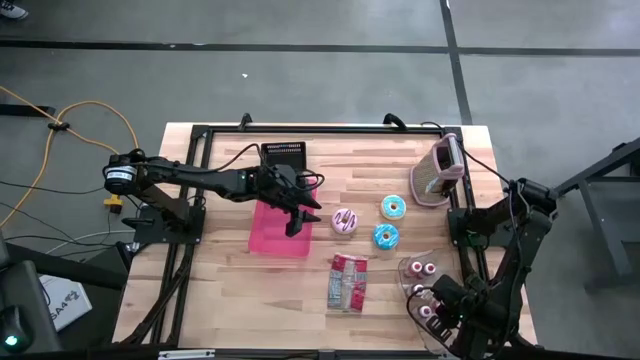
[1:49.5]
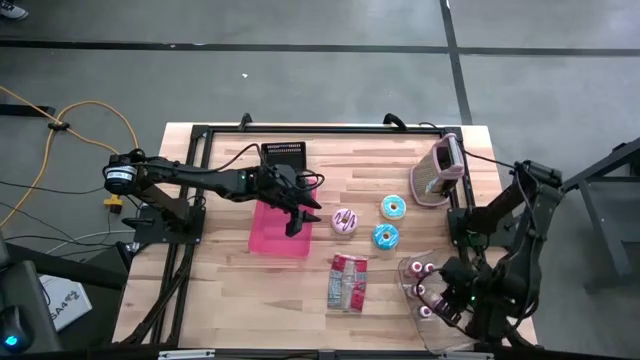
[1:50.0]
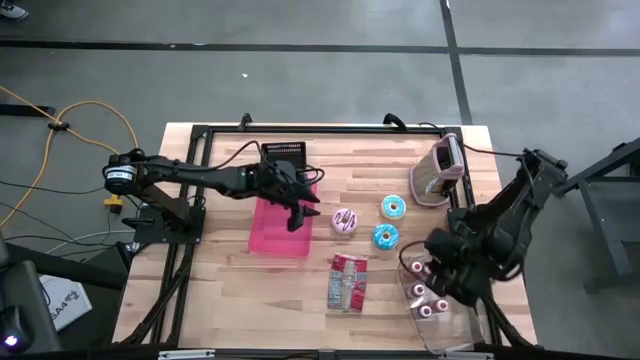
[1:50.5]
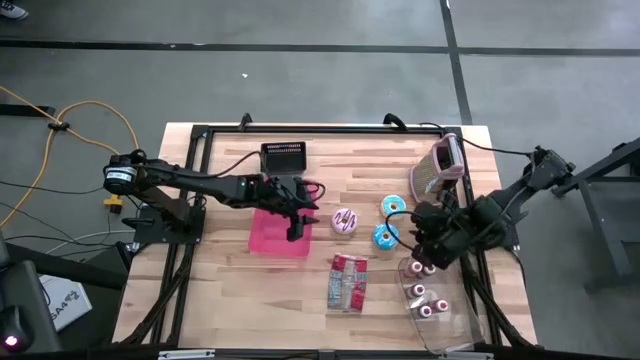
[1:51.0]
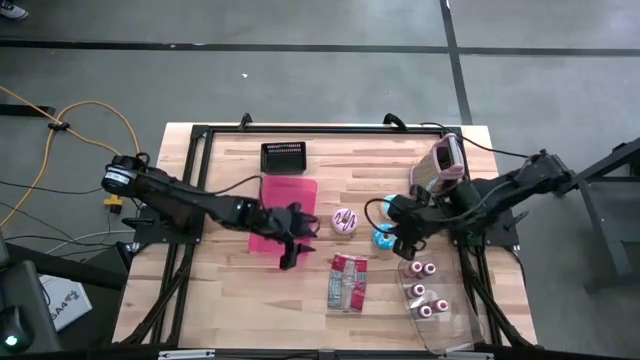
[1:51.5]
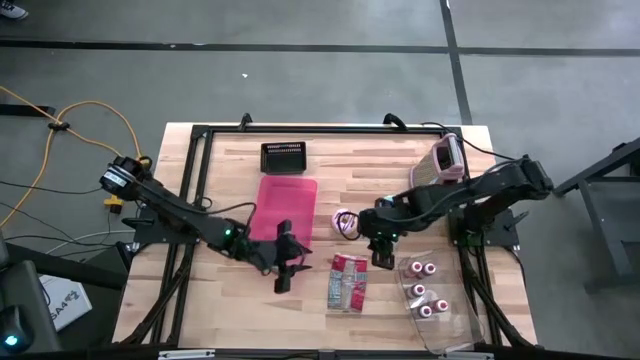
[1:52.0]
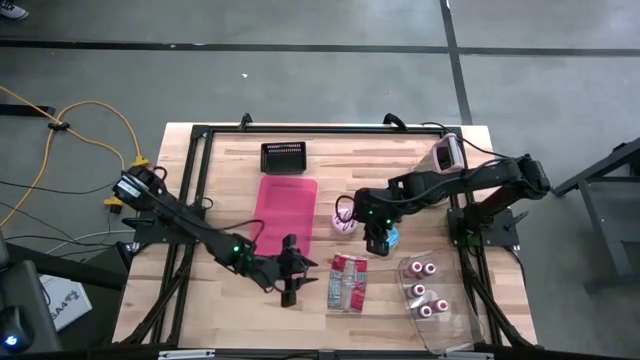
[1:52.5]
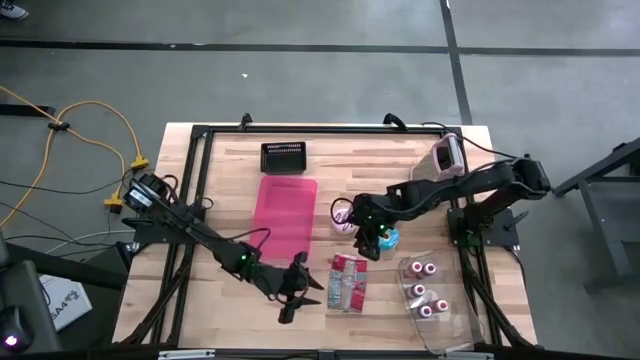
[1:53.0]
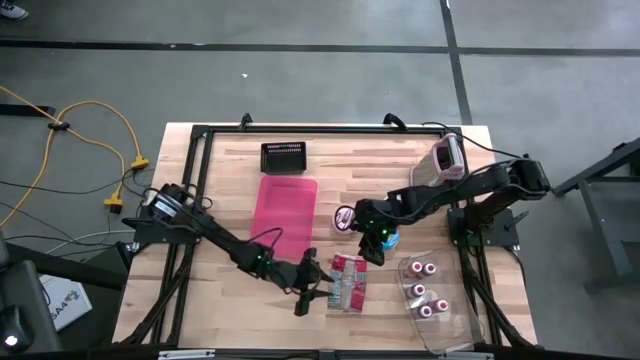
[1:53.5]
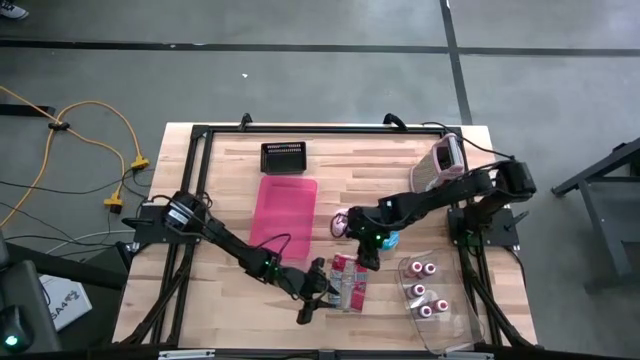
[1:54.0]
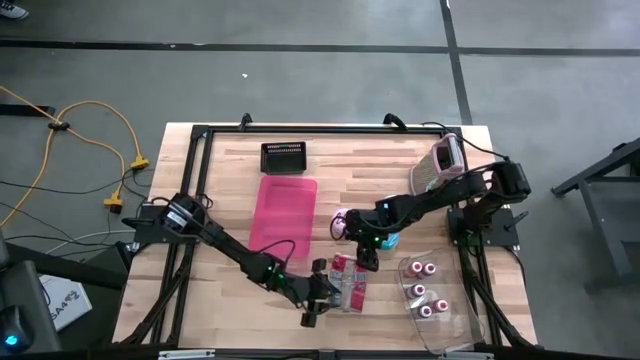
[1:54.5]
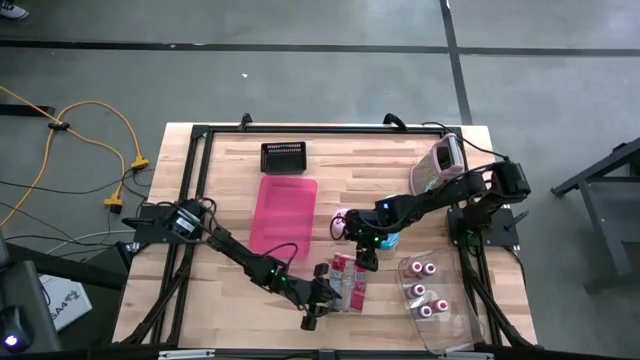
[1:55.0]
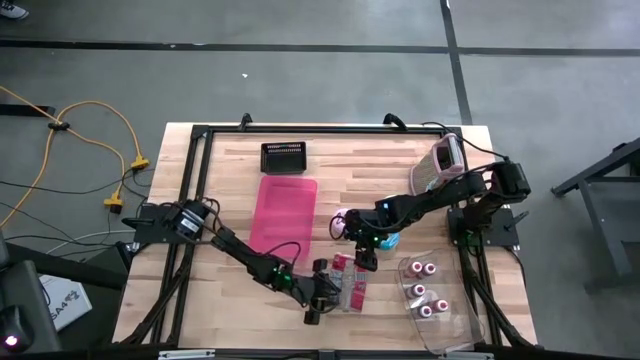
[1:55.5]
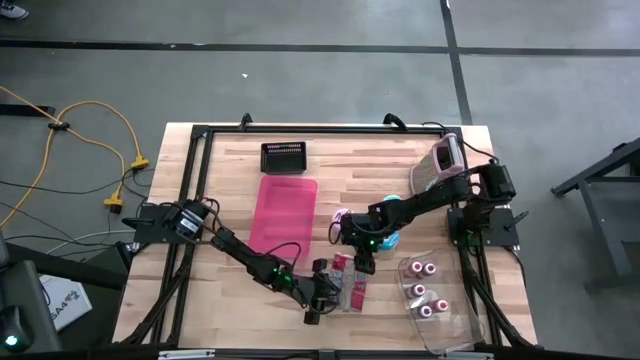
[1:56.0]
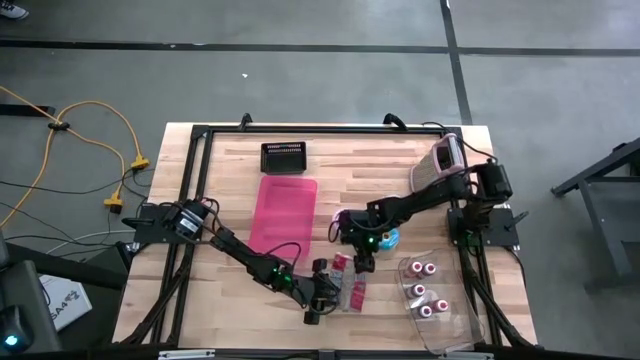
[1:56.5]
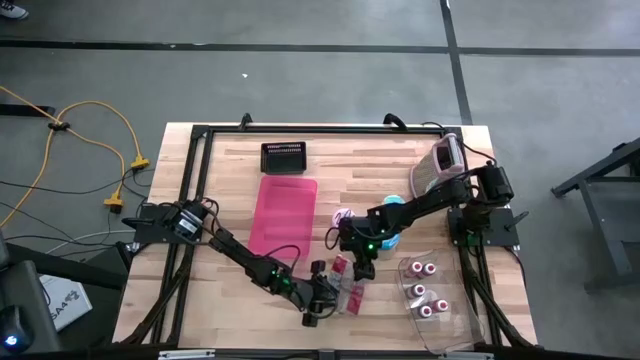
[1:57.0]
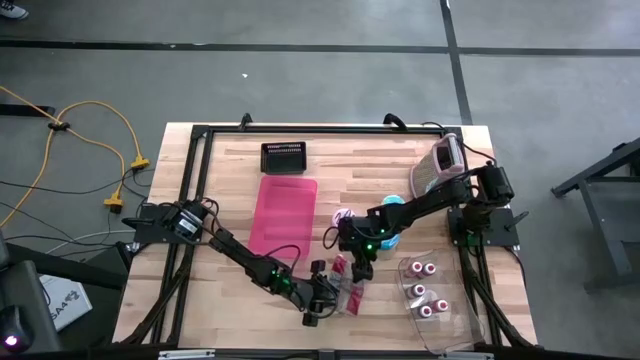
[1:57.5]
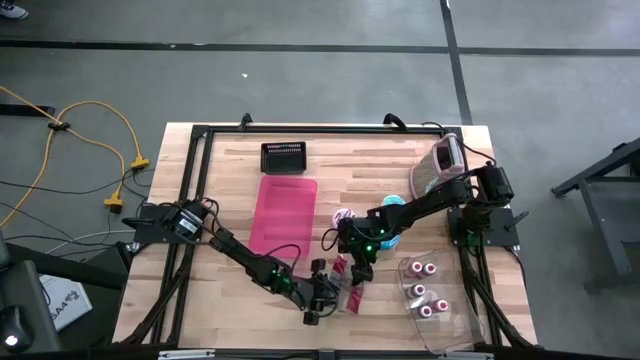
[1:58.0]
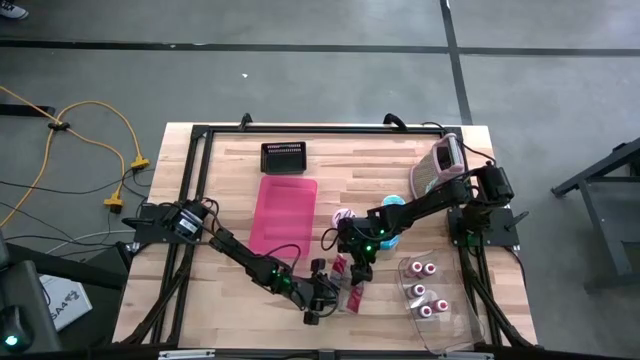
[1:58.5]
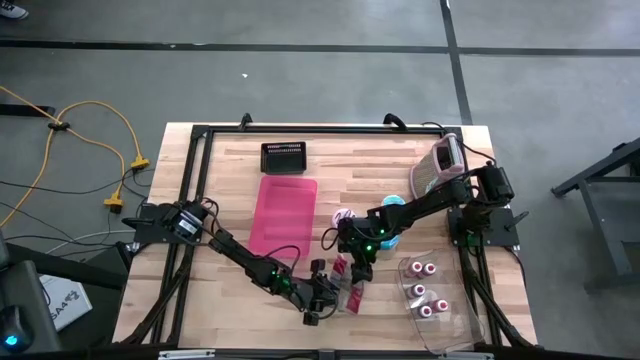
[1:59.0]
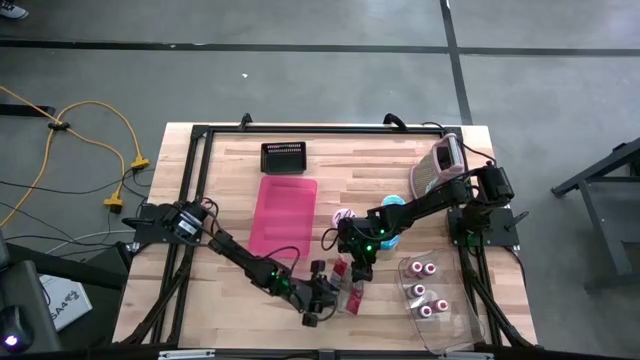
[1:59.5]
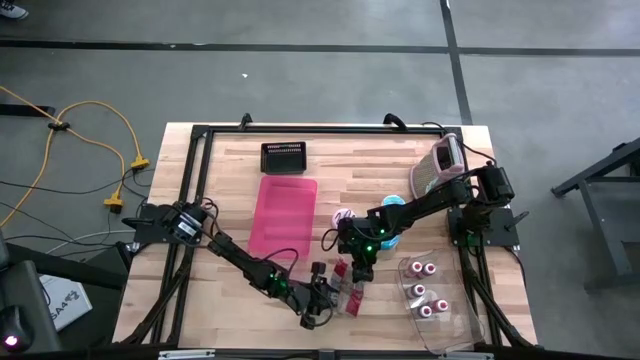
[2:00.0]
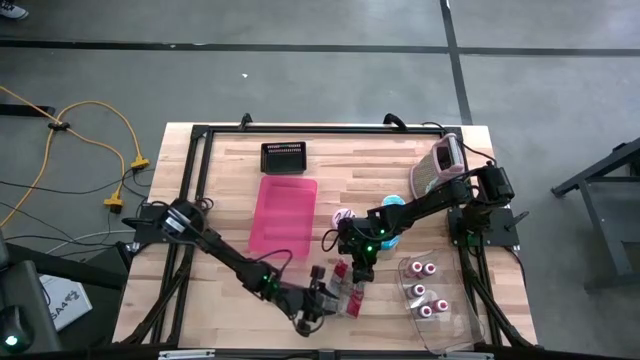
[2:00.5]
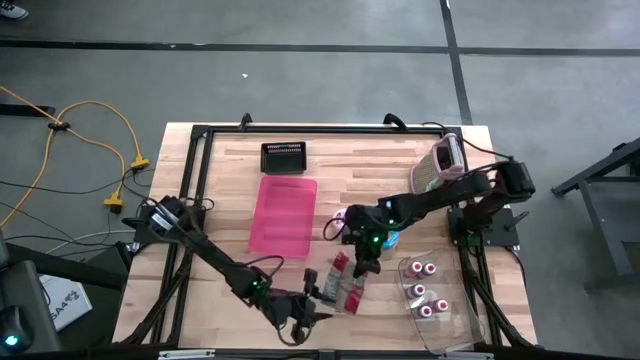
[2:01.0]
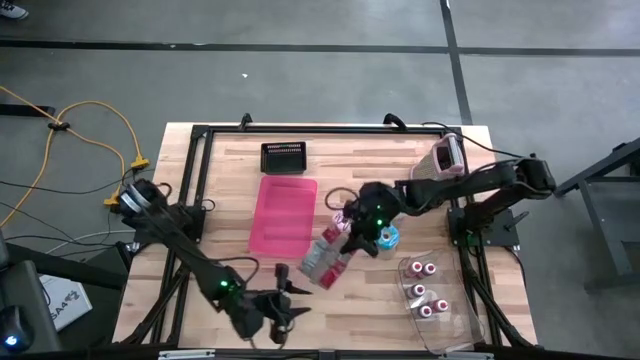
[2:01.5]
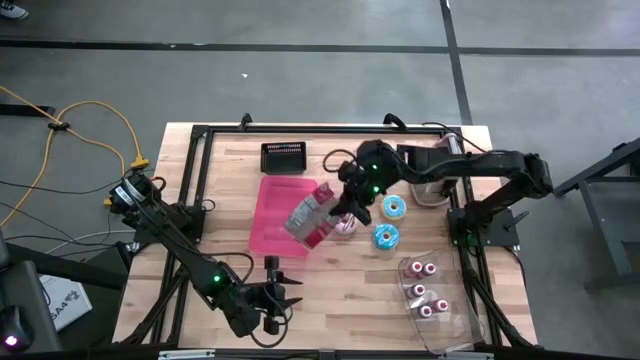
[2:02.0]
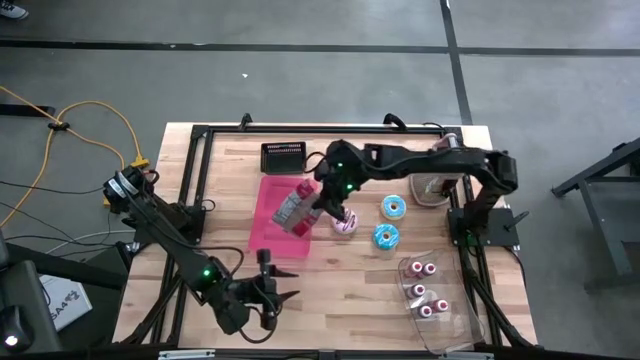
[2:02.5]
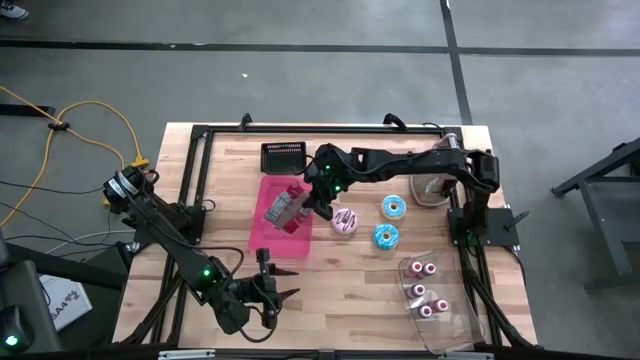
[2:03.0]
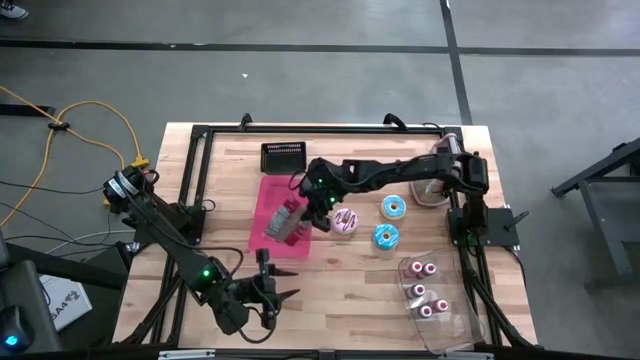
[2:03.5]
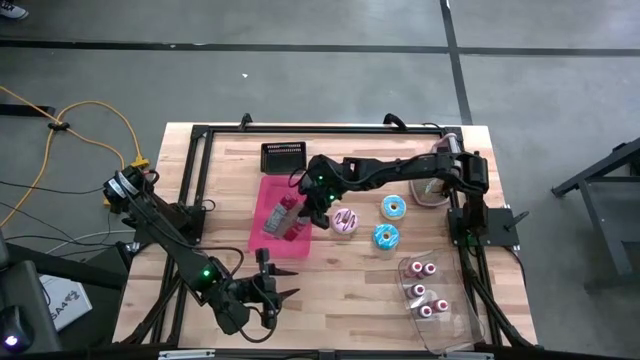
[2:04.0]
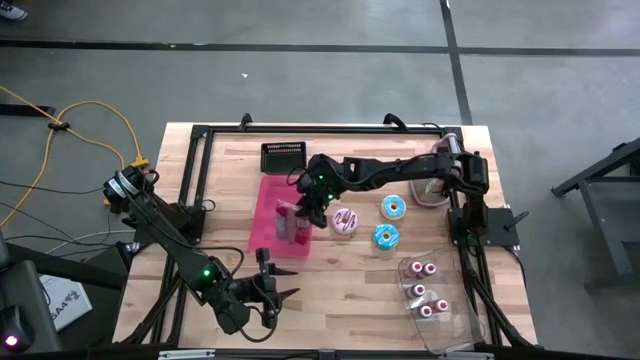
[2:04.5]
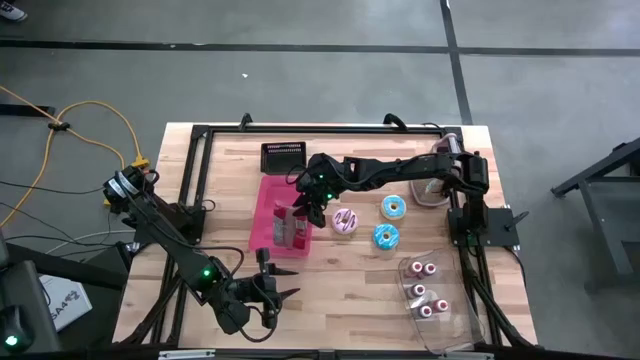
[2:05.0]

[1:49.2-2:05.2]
Put the popcorn bag into the red bin

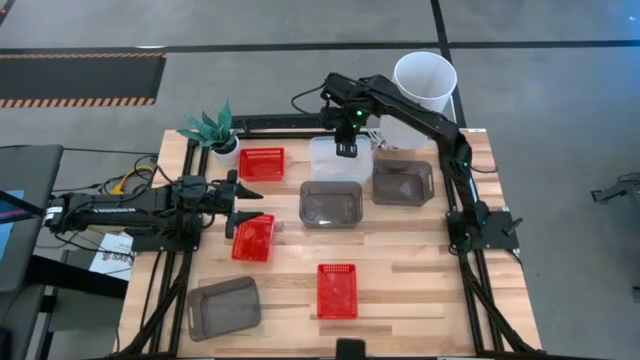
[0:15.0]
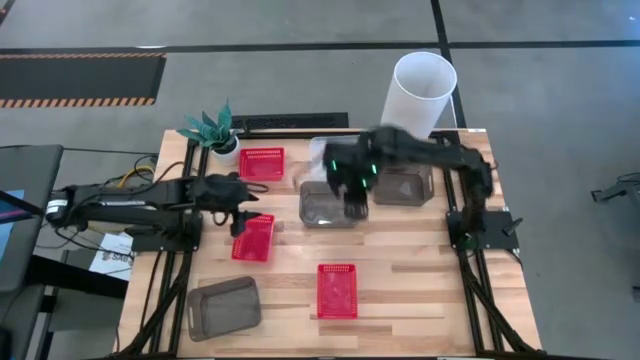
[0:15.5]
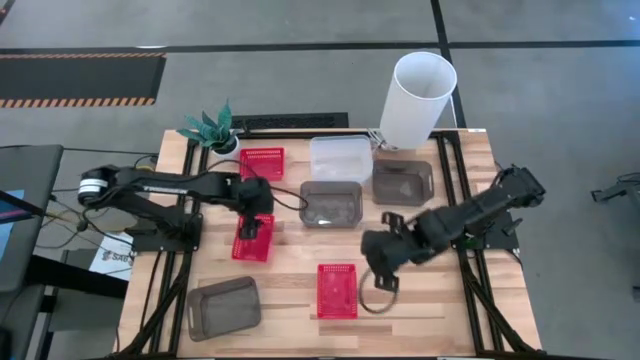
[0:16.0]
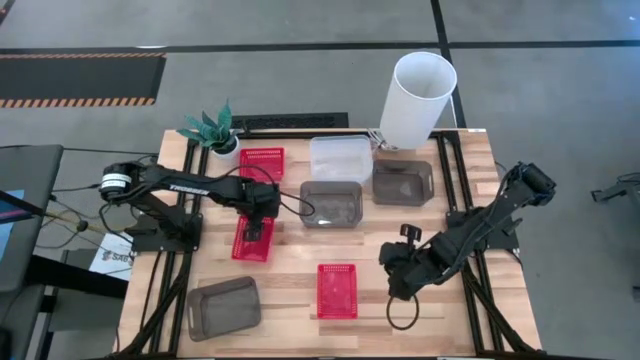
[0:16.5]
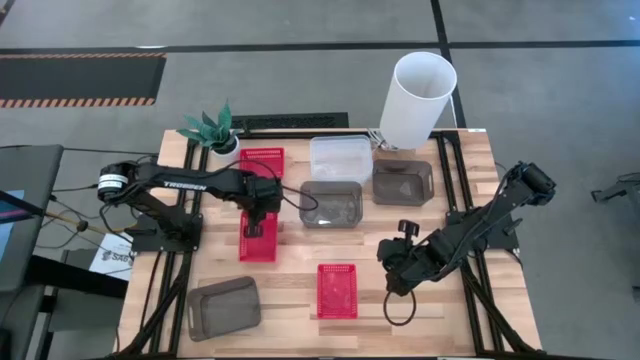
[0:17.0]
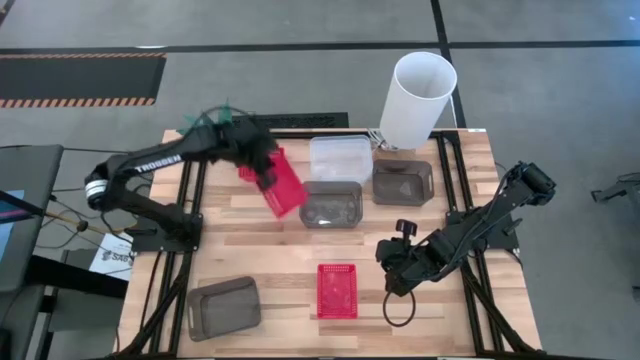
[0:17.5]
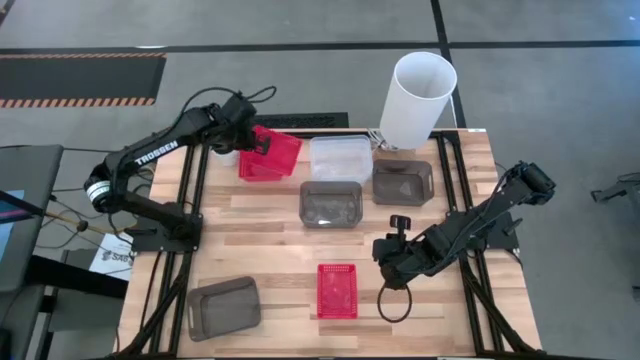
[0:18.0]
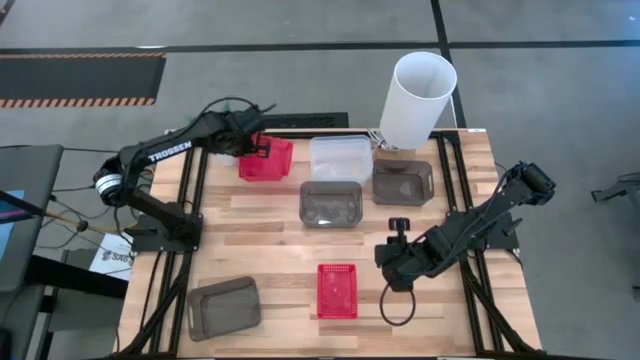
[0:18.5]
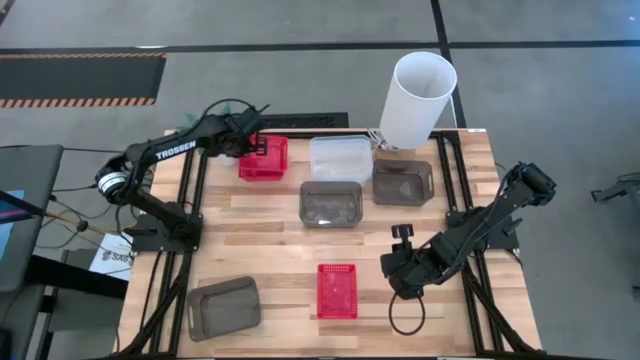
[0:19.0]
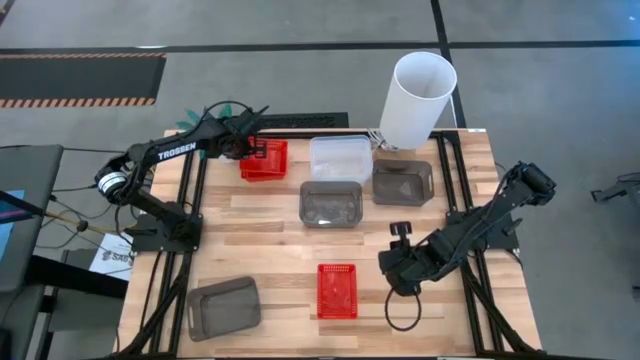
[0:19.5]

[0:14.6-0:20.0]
Stack the middle left red bin on top of the top red bin
